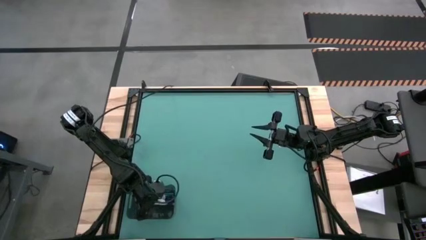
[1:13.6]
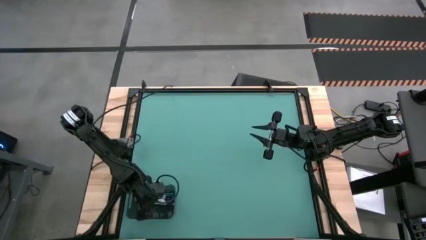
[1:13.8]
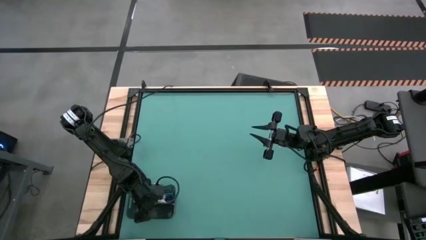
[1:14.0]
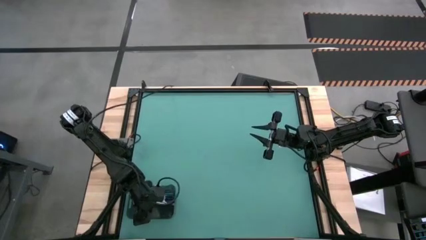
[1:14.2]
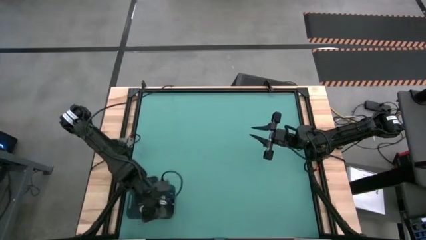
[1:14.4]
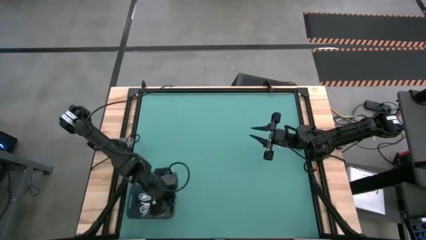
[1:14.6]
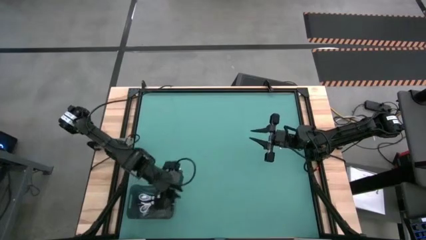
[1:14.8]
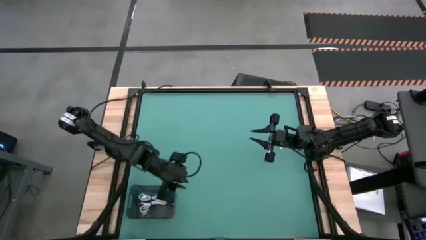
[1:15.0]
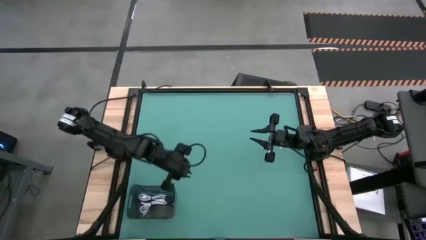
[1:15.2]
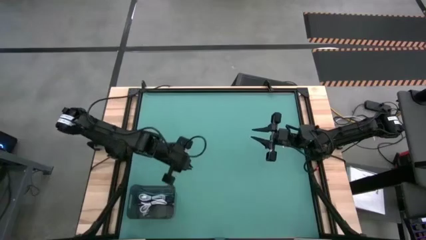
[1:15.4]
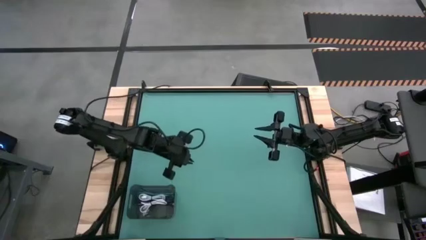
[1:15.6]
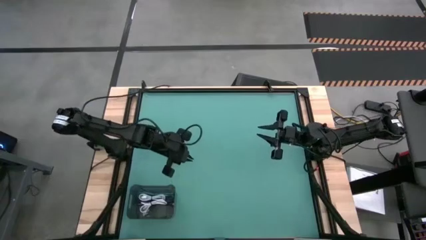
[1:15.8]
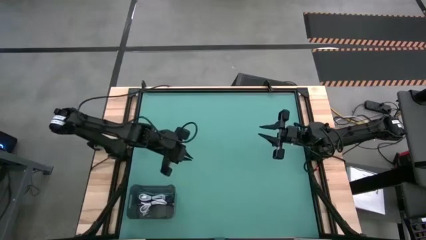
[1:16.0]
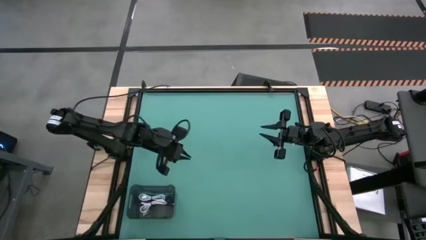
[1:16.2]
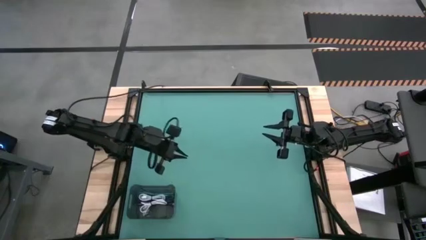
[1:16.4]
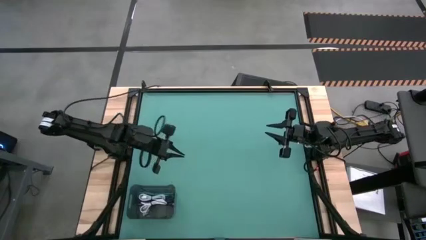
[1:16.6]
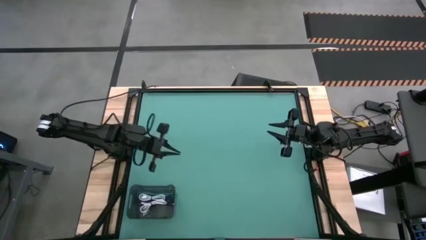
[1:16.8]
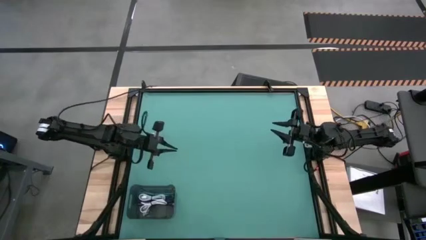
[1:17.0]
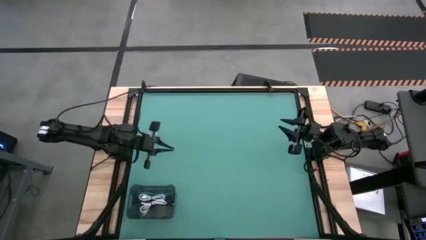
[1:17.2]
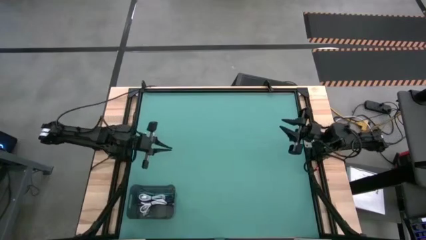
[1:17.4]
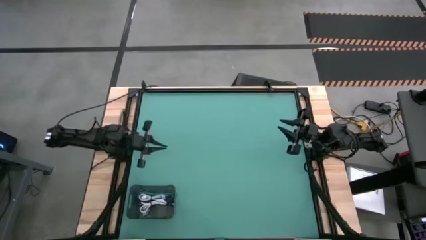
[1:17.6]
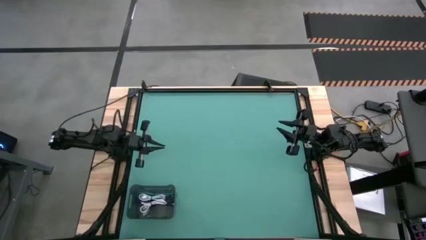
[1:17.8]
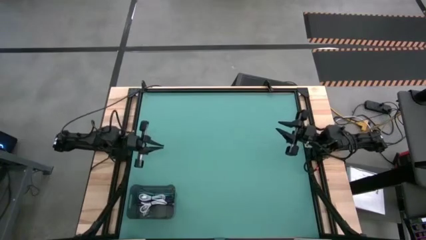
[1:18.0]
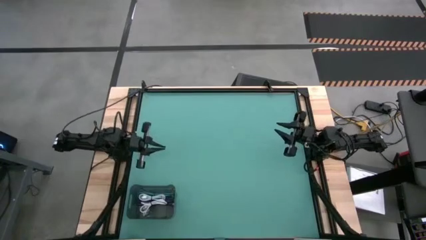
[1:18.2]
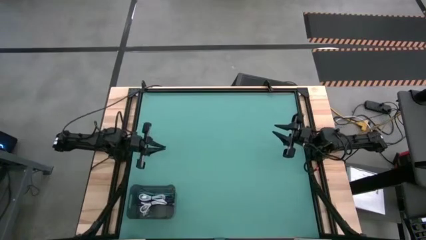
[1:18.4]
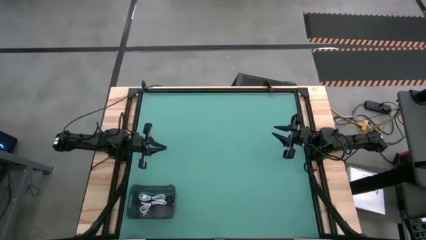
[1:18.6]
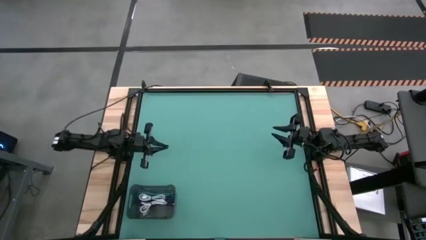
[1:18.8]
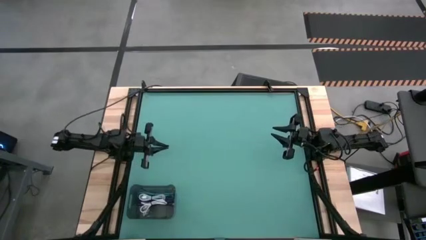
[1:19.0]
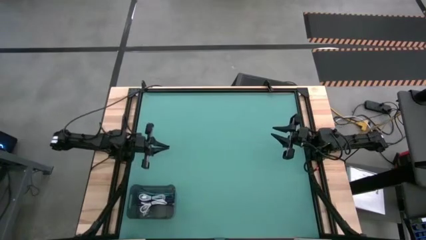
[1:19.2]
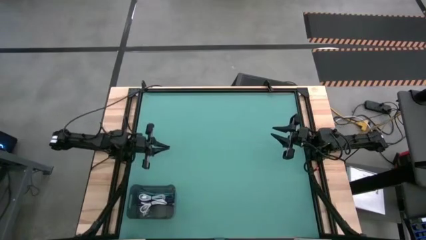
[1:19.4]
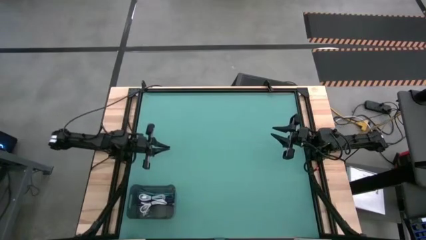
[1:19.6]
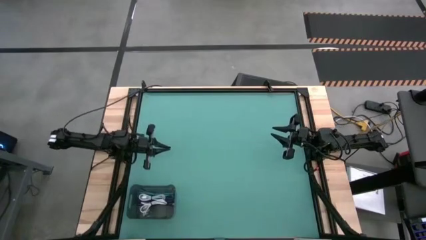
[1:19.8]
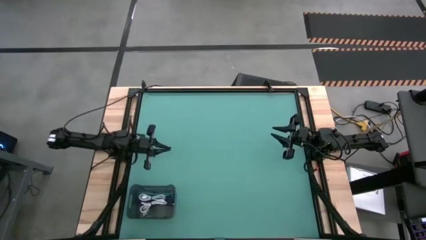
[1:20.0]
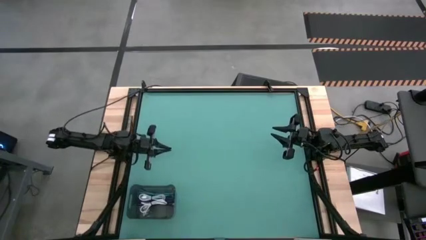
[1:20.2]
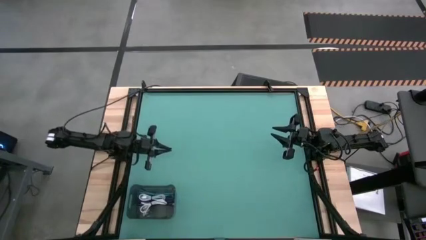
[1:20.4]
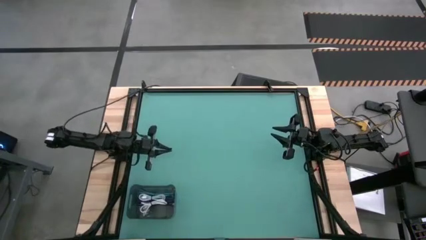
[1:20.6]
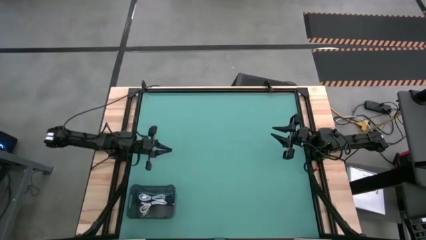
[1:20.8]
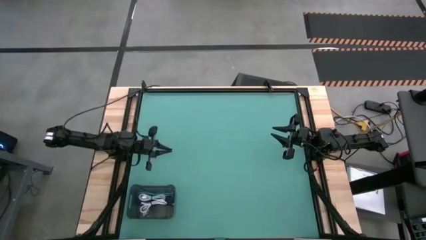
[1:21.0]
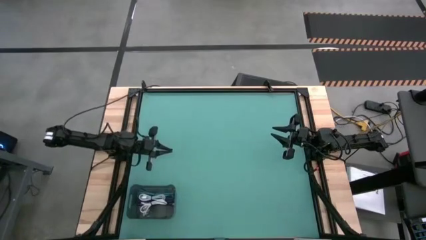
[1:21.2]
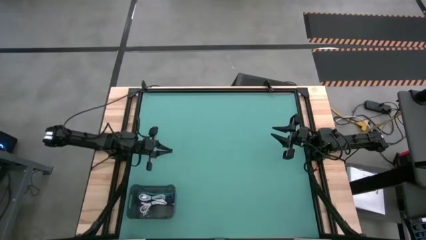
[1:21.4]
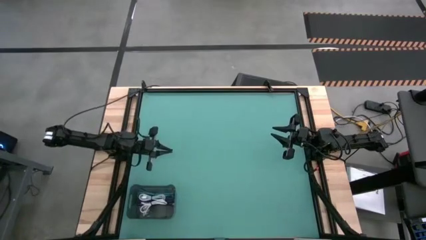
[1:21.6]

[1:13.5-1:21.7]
Task: Pick and place USB-C Cables
Return to Home Position

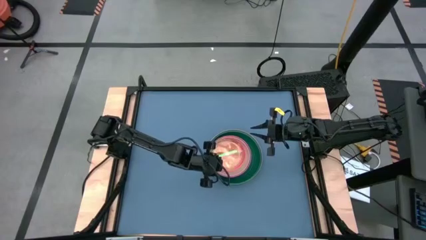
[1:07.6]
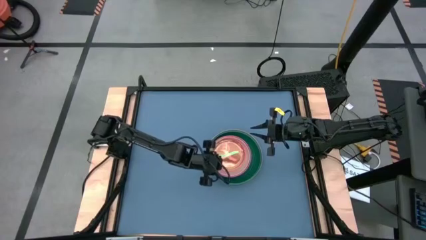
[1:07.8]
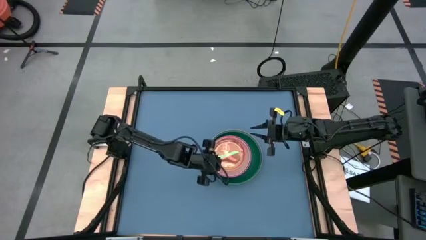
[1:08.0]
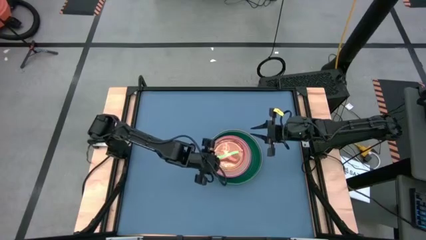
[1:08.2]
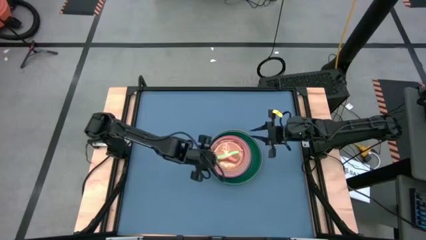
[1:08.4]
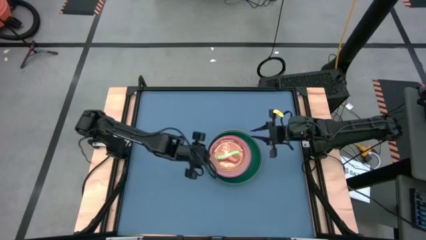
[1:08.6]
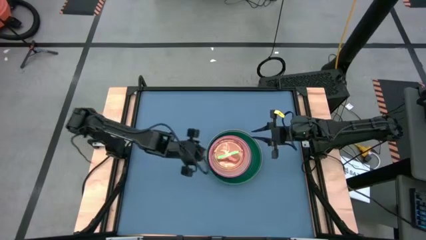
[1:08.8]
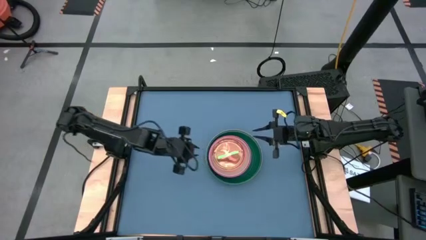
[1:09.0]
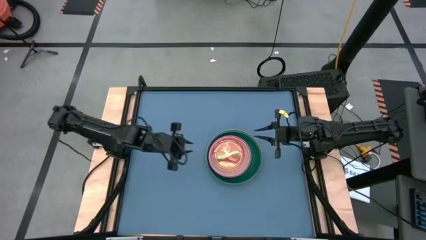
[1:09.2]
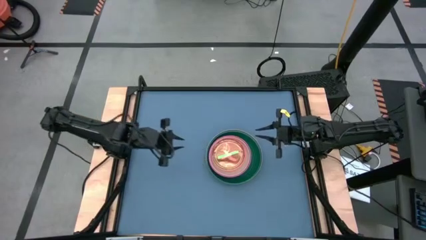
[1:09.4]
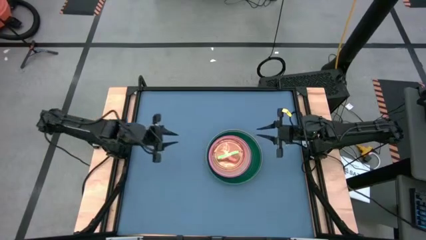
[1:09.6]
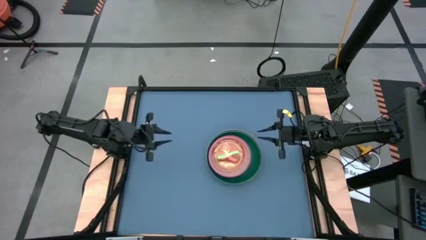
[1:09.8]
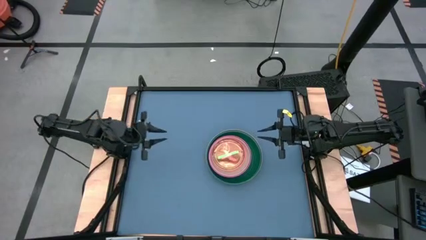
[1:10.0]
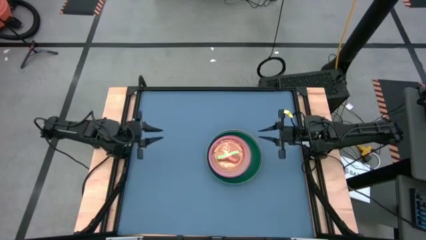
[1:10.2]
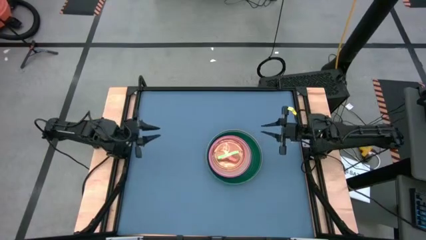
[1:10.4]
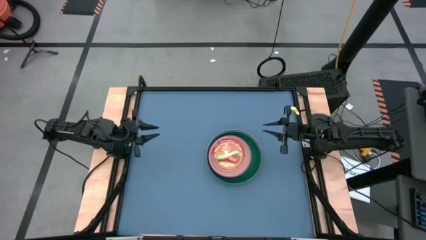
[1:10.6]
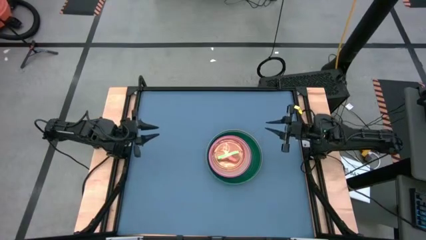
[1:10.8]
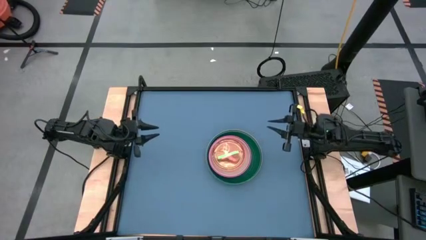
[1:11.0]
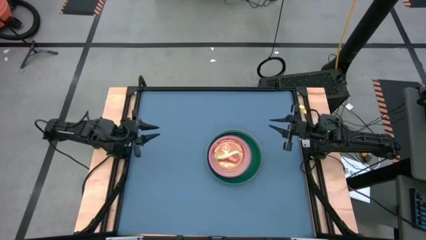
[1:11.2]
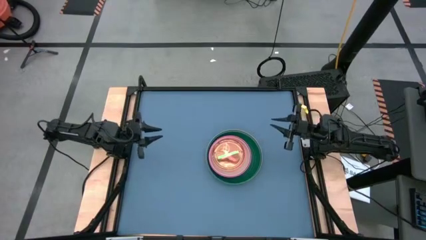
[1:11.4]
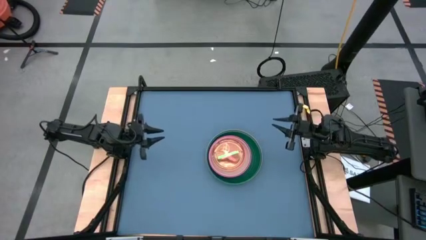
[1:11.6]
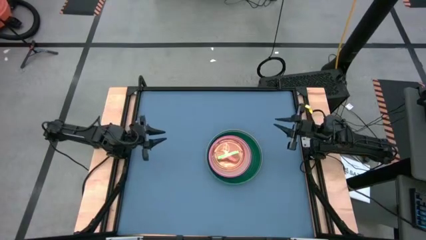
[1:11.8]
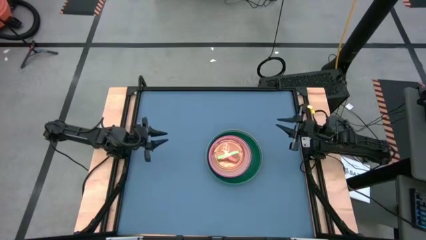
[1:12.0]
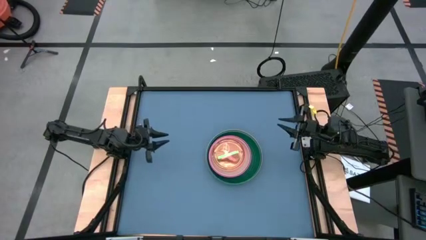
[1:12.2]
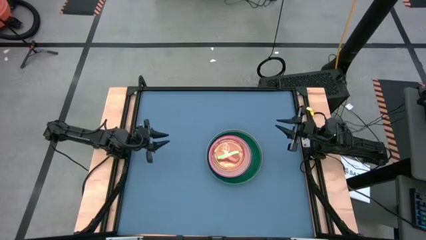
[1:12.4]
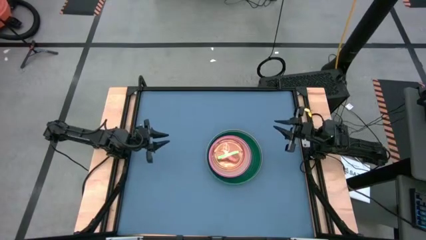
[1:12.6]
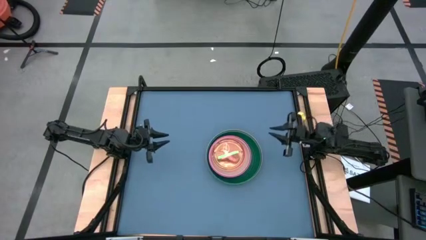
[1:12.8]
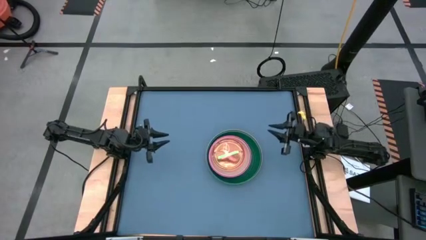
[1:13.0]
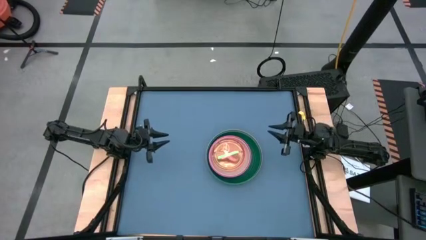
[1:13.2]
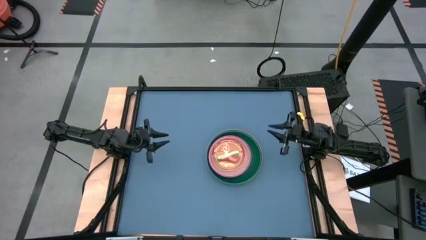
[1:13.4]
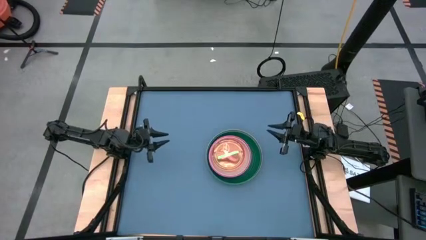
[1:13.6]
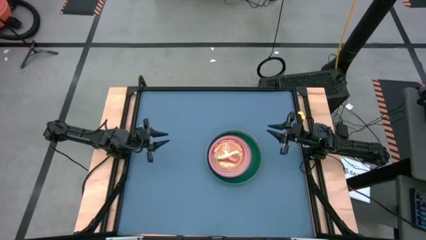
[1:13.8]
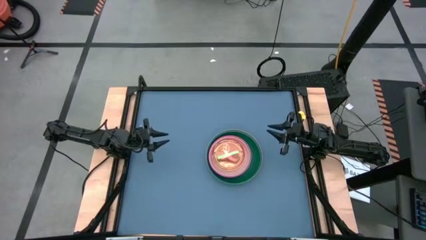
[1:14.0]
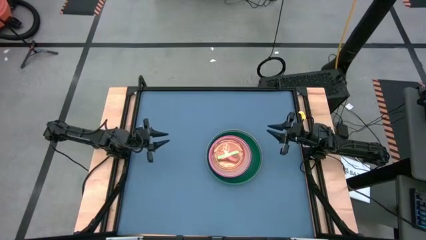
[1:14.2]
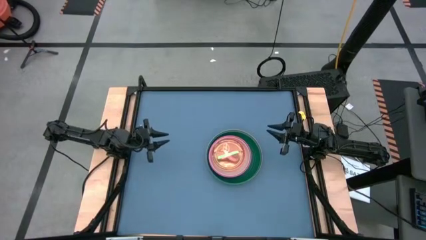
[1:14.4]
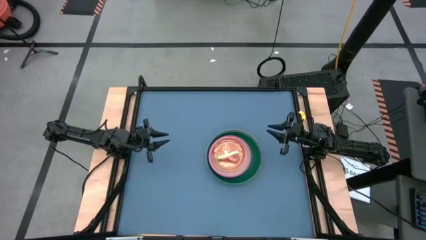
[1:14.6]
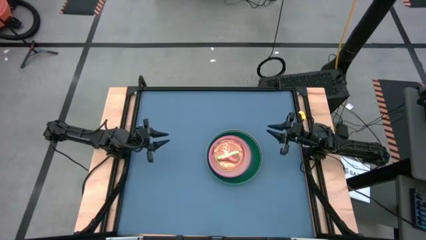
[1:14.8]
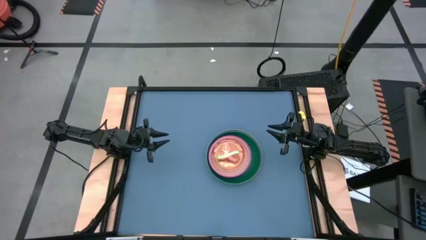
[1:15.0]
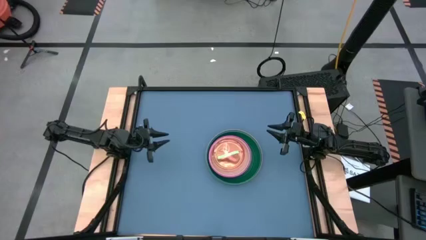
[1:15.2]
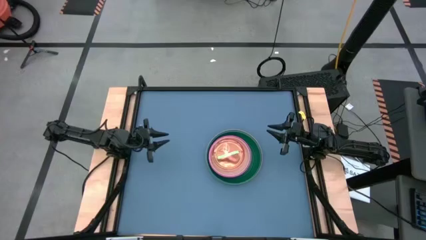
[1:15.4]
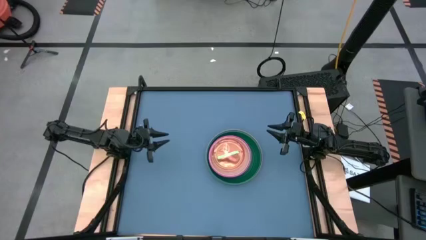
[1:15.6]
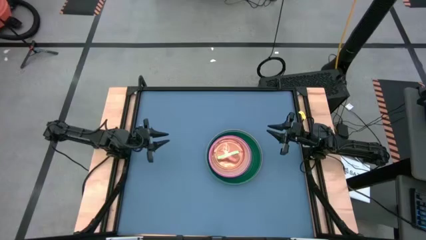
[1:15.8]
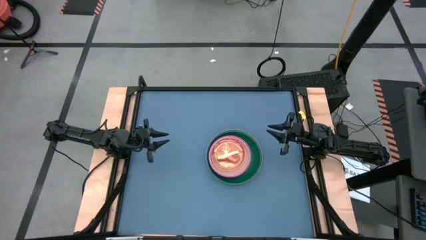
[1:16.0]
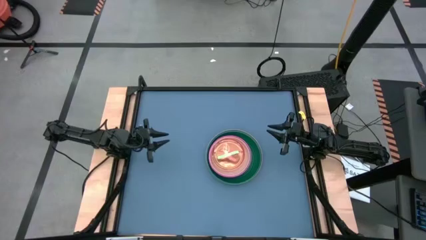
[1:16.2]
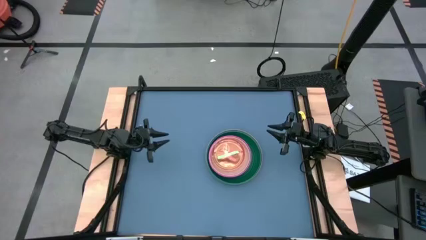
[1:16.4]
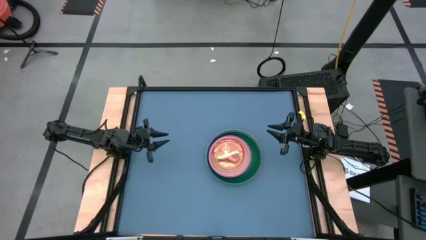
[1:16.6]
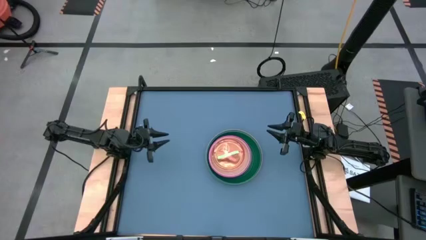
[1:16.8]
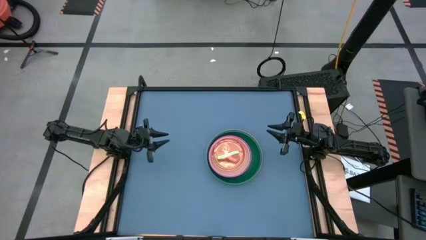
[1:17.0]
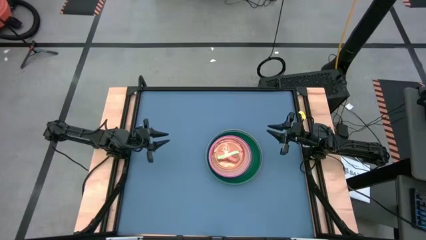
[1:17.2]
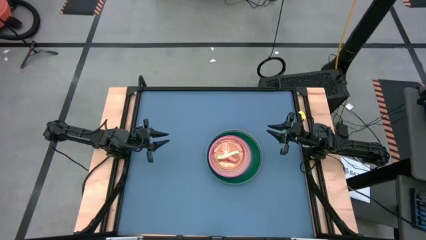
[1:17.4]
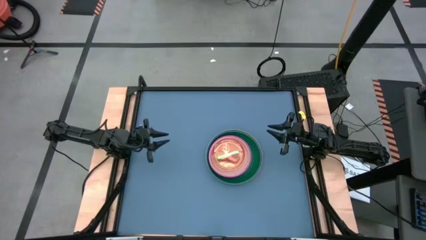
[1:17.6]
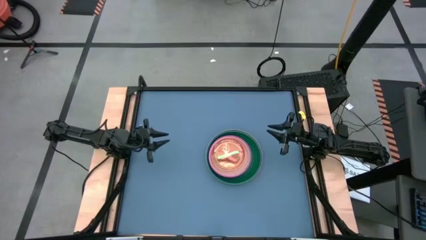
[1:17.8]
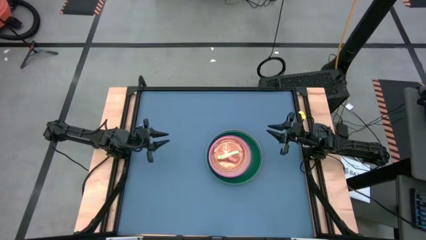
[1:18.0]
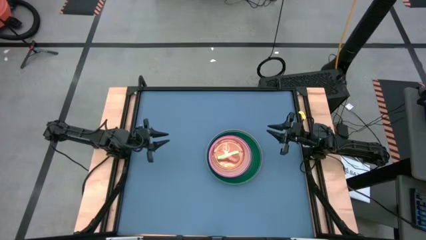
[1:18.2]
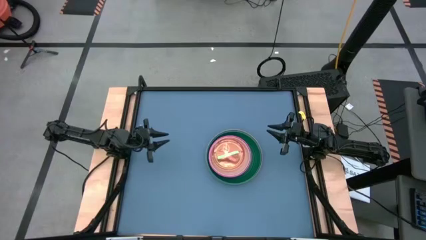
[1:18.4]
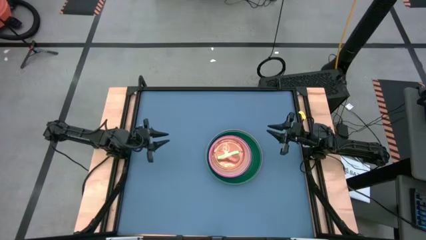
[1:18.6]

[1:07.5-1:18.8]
Task: Stack plastic plates
Return to Home Position
